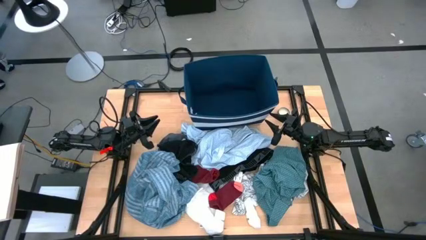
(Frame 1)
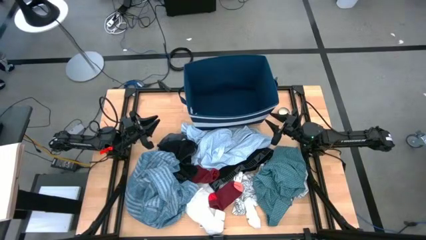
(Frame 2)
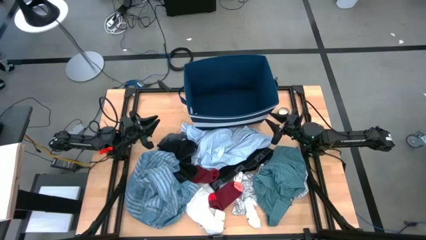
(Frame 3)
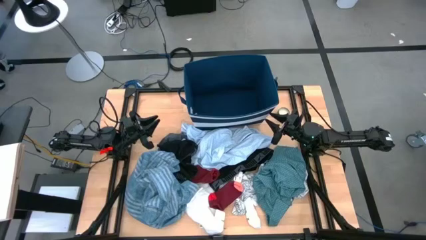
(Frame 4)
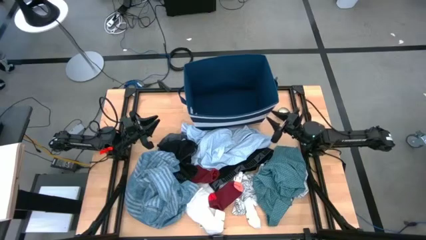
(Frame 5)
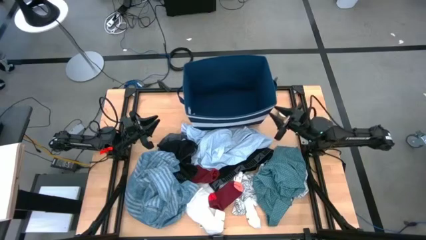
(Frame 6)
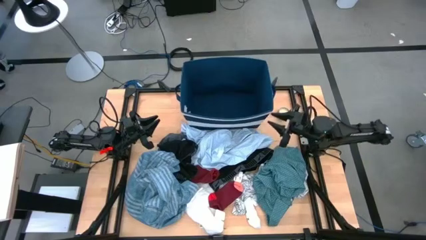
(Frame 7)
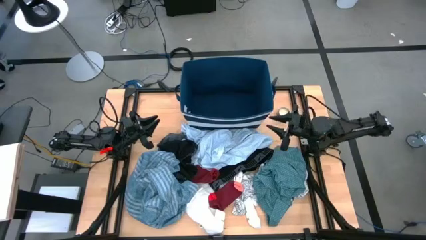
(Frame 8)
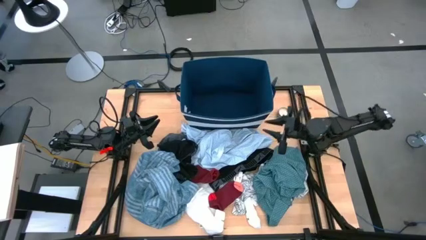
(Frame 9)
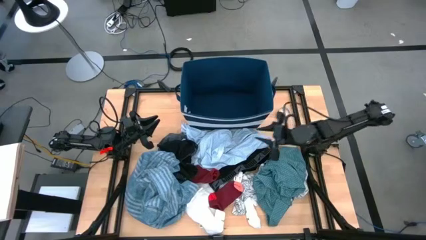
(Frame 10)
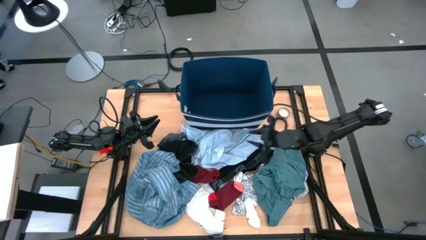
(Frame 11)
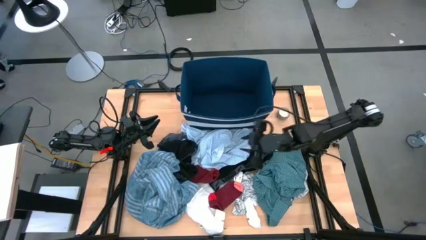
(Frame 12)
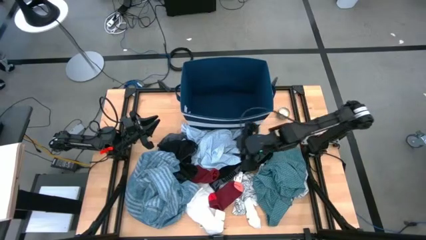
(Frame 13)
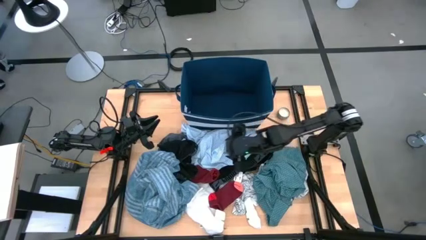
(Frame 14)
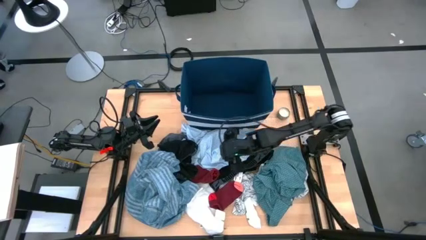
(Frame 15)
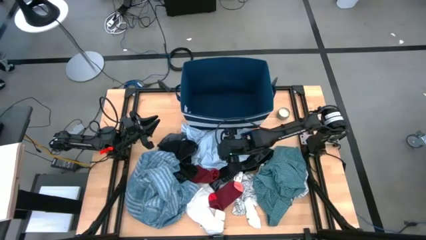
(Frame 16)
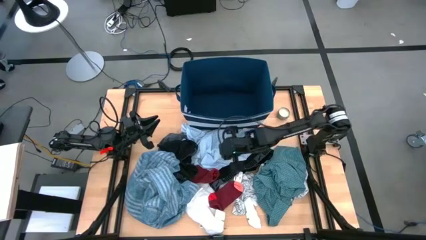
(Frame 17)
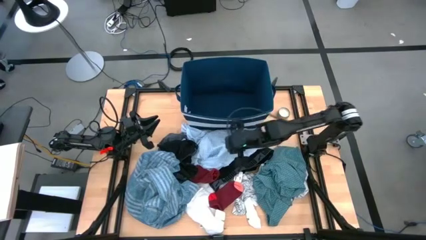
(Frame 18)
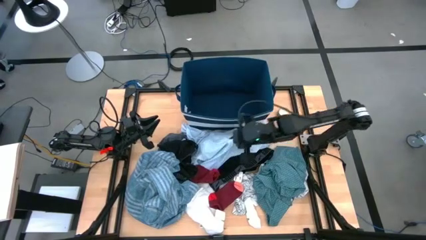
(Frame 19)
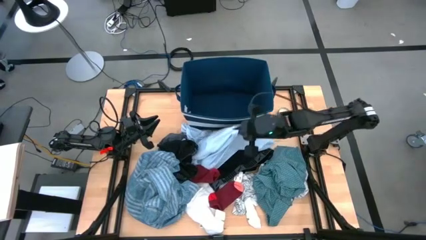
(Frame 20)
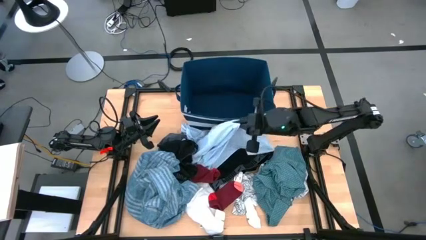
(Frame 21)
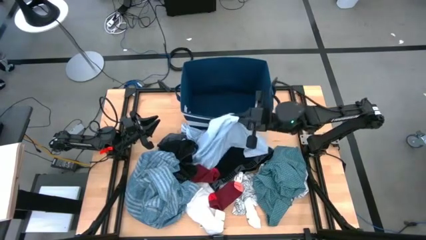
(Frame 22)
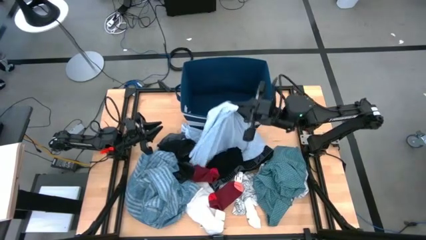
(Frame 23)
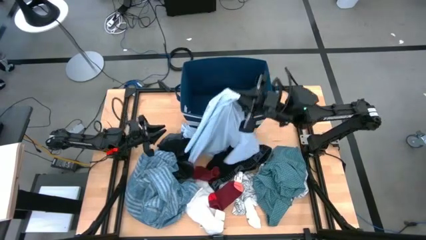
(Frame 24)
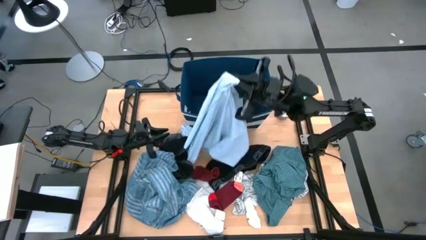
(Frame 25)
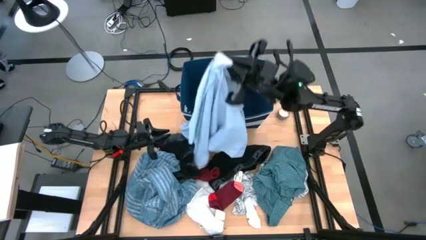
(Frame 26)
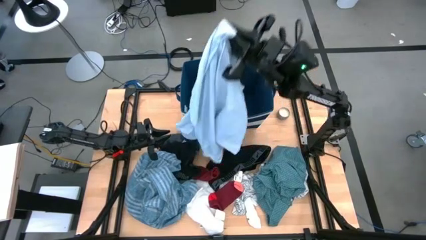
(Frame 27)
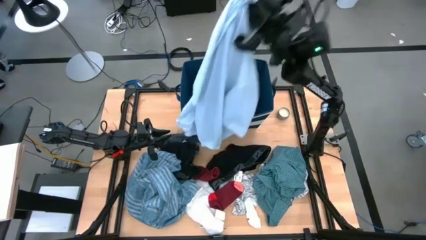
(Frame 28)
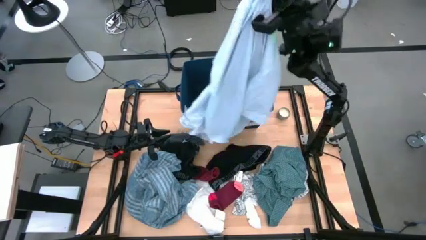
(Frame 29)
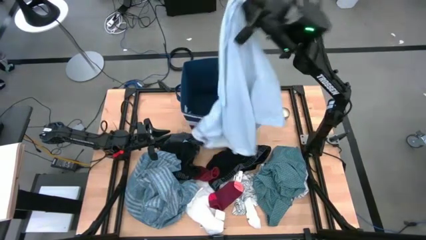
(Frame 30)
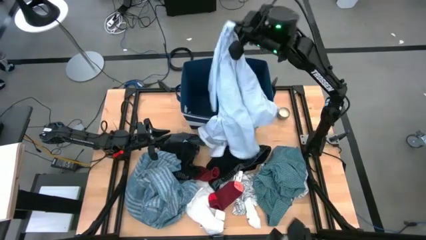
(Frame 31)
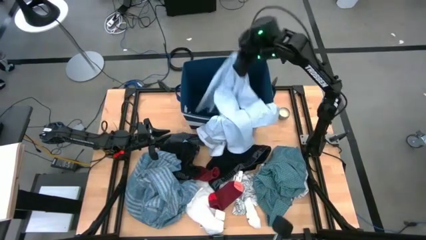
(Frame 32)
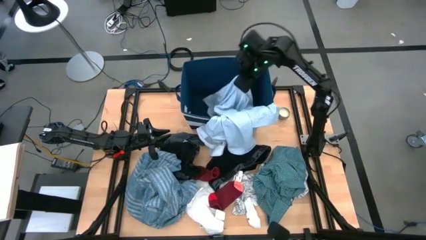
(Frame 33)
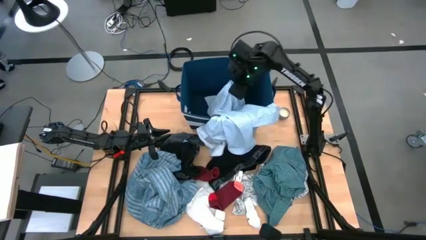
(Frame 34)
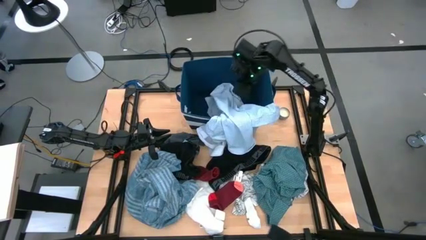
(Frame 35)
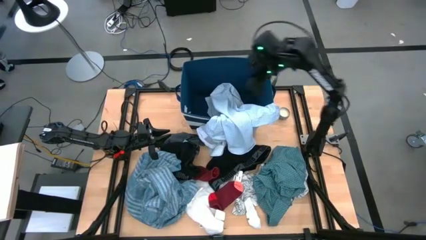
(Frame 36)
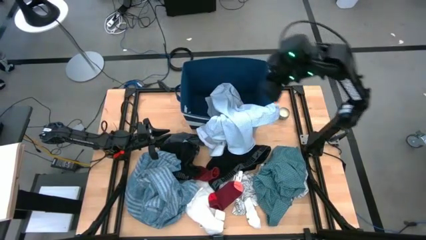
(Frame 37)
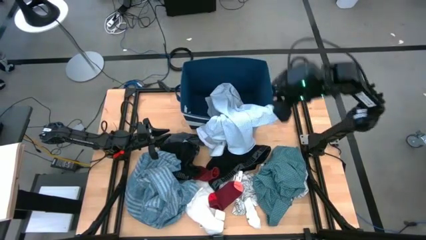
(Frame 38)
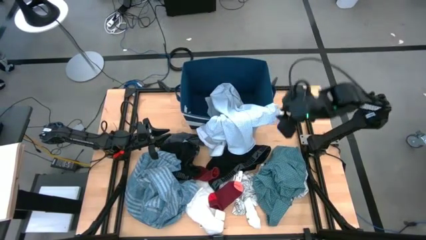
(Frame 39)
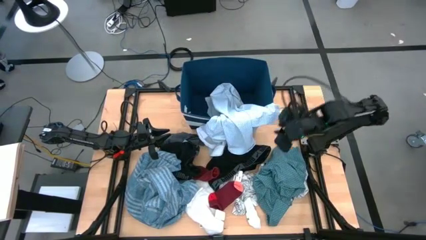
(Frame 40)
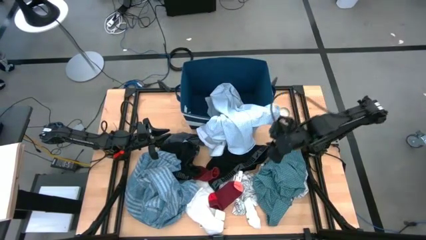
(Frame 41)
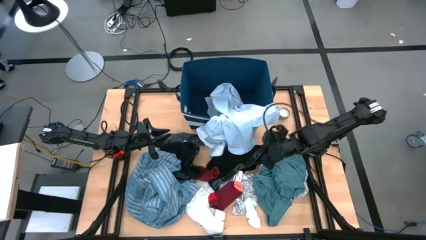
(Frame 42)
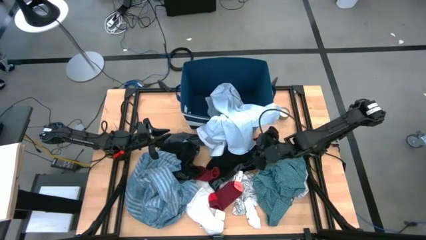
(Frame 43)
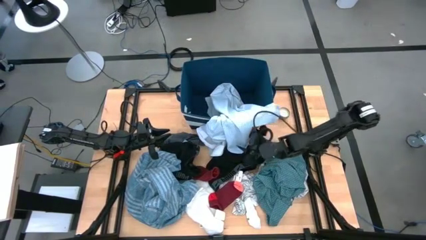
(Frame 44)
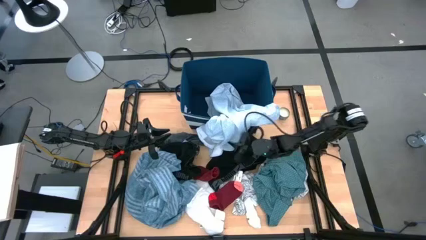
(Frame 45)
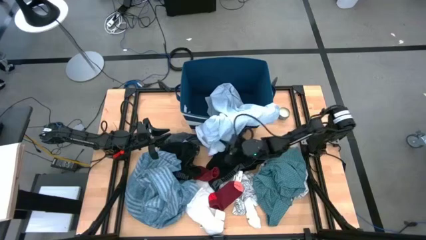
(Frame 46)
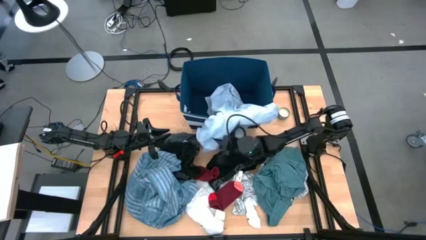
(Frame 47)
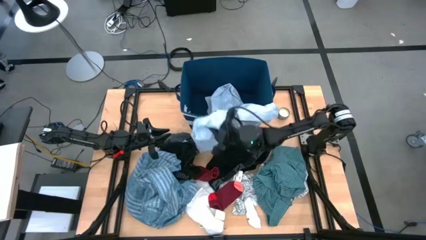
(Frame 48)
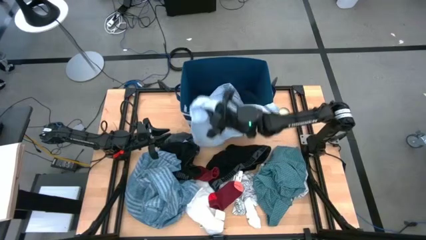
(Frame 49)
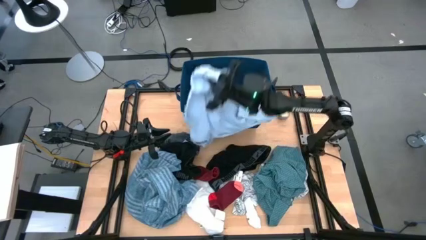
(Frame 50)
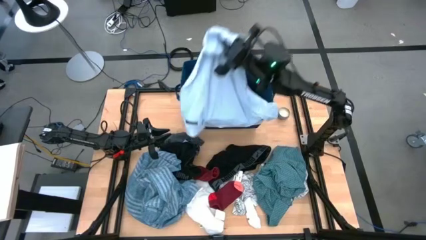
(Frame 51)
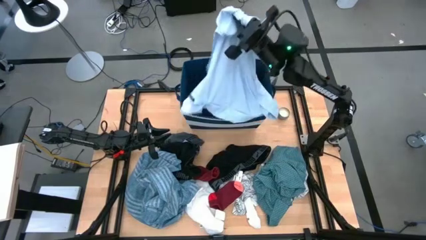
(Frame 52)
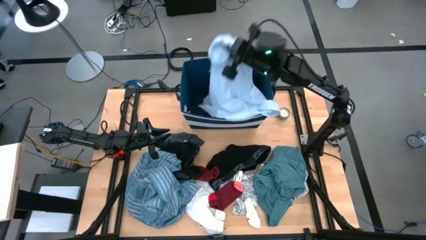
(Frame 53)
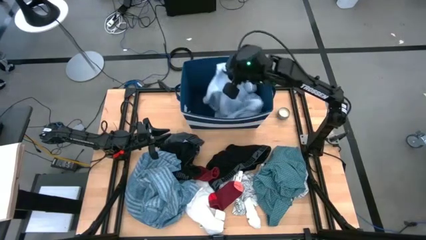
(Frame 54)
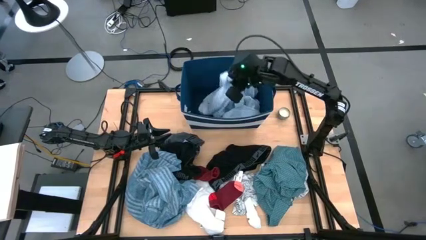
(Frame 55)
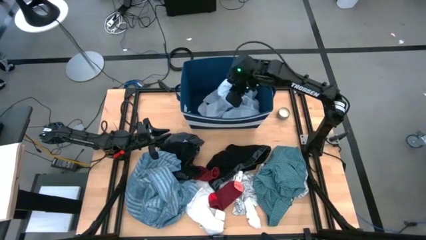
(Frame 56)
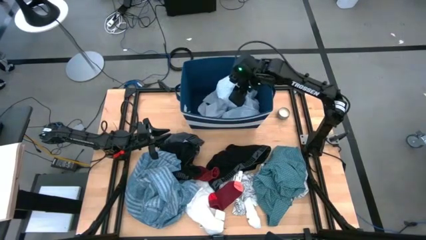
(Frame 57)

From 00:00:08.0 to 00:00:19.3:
Task: Sort clothes
Put the light blue shirt into the blue laundry bin

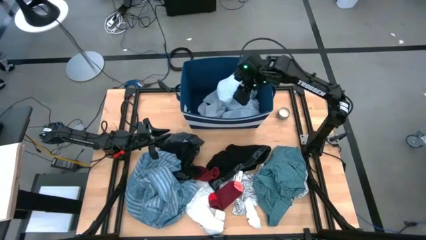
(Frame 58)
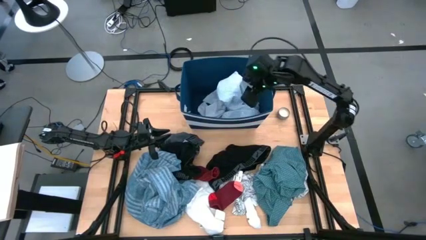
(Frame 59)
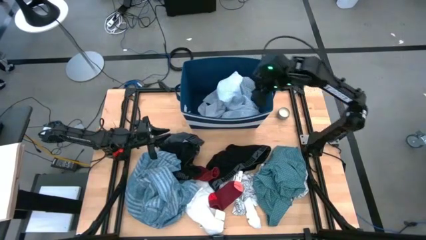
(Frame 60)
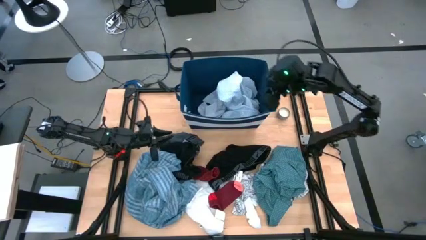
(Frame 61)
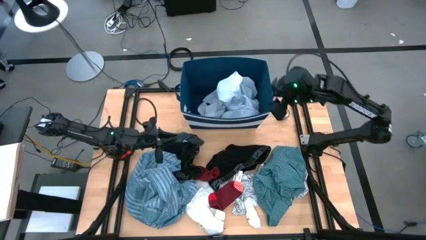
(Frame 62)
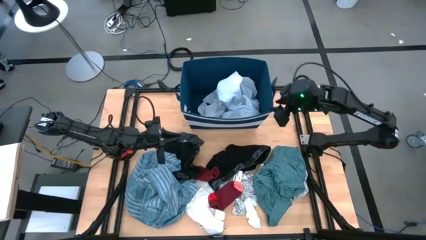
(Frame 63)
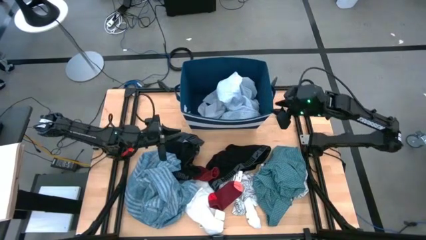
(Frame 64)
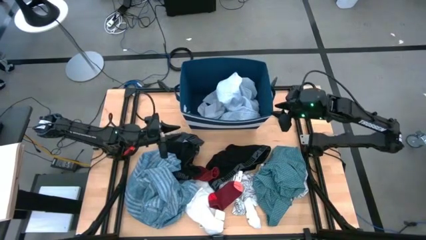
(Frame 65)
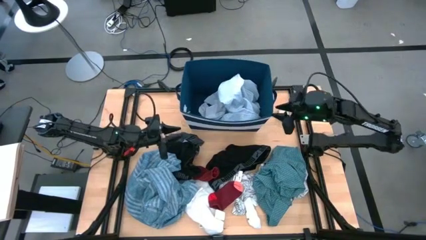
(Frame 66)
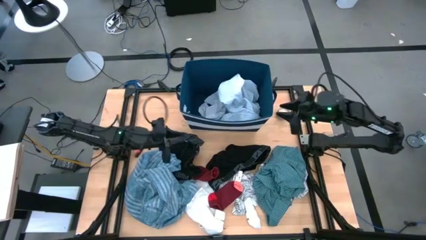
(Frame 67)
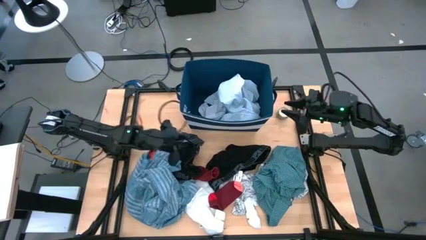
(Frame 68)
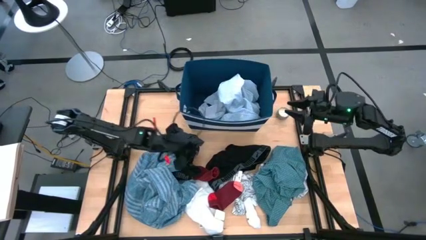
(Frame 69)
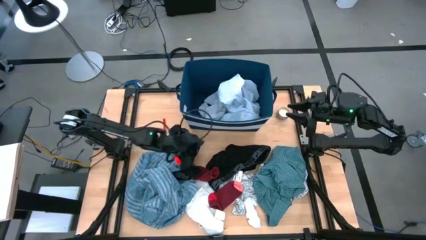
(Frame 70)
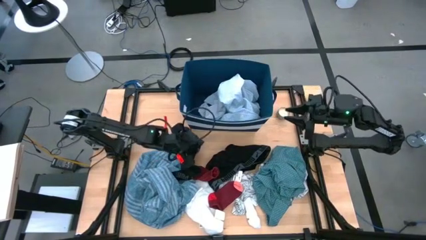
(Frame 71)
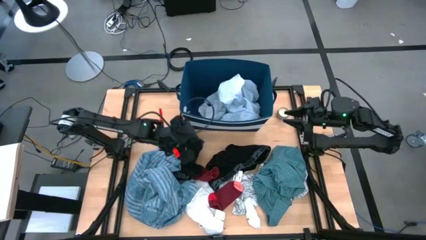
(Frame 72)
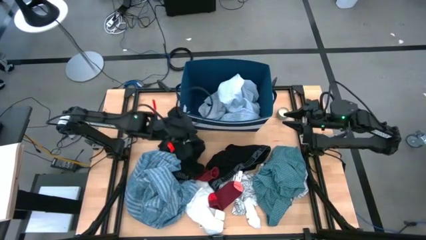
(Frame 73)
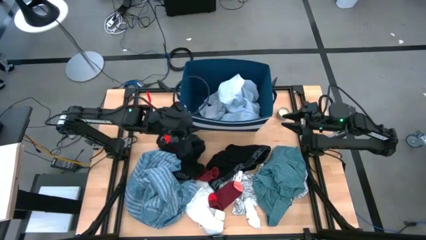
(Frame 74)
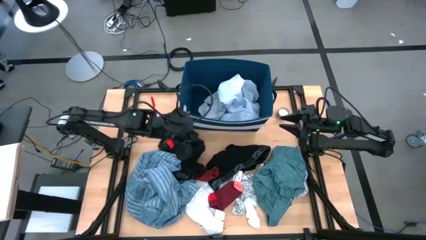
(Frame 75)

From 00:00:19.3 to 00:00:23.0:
Put the left black boxer into the blue laundry bin

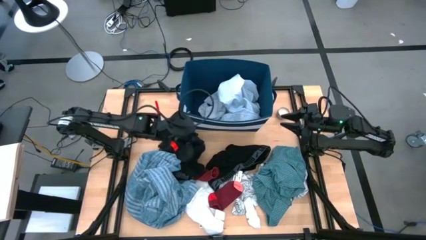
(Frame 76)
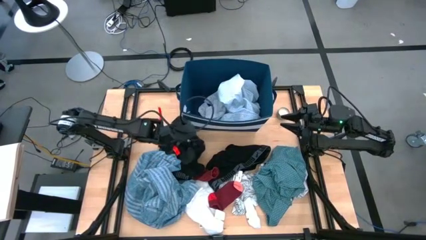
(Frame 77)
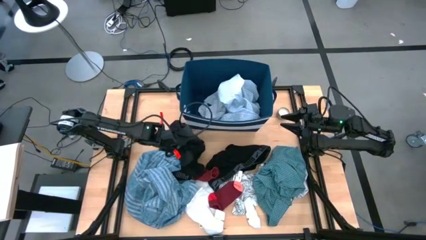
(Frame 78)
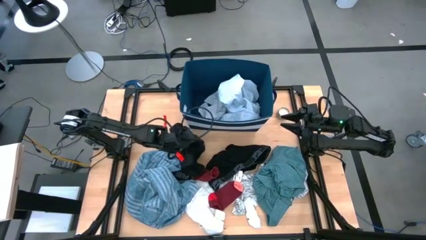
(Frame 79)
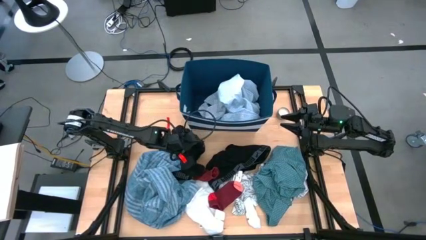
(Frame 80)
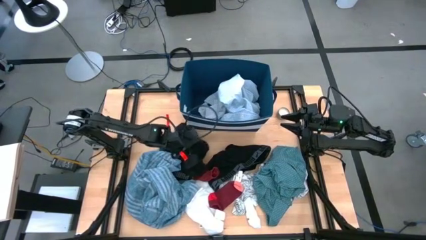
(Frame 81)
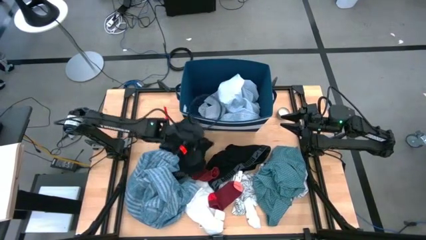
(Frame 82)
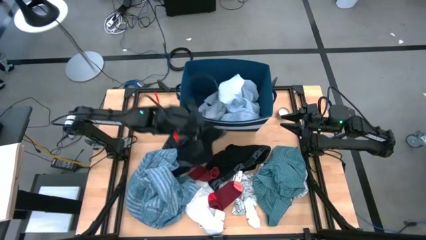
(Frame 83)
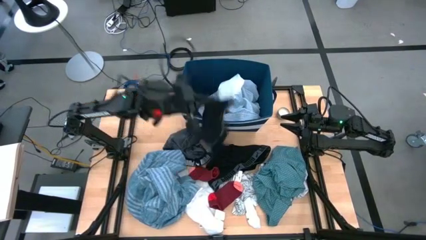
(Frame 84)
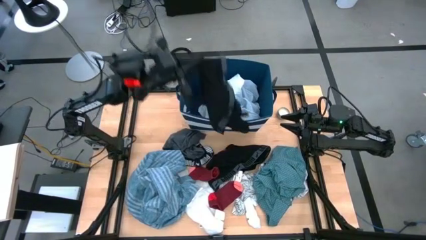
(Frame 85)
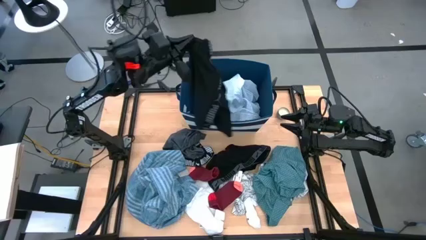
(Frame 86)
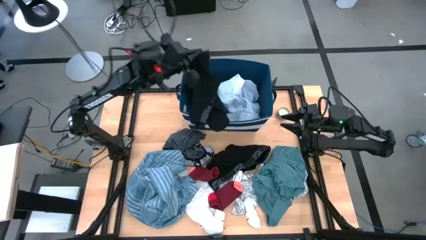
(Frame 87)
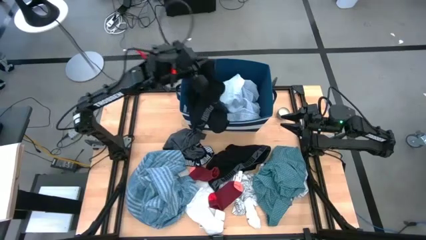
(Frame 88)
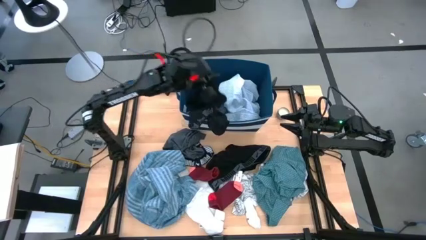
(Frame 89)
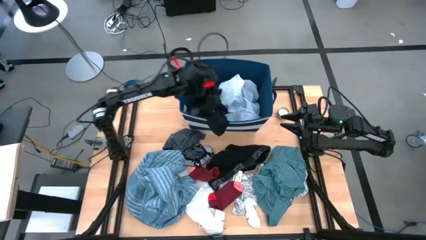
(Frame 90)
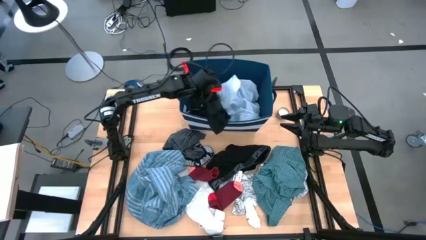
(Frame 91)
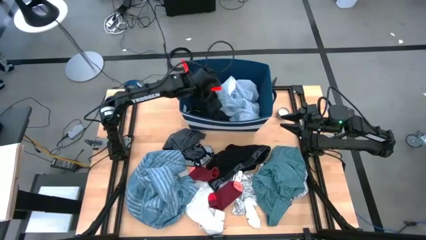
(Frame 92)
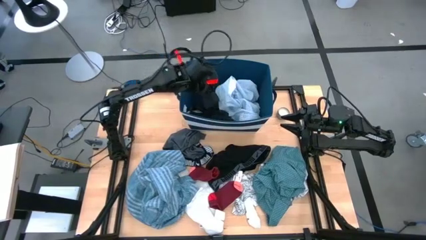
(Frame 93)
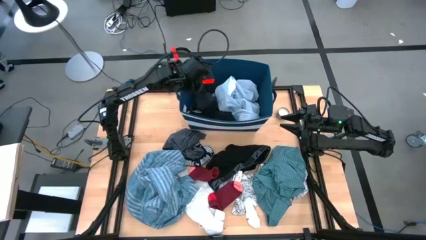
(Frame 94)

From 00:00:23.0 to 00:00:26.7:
Put the left black boxer into the blue laundry bin
